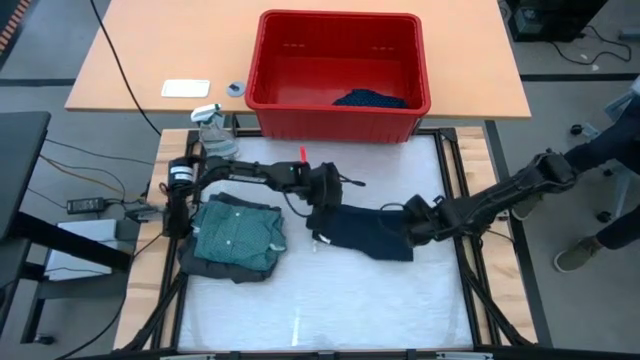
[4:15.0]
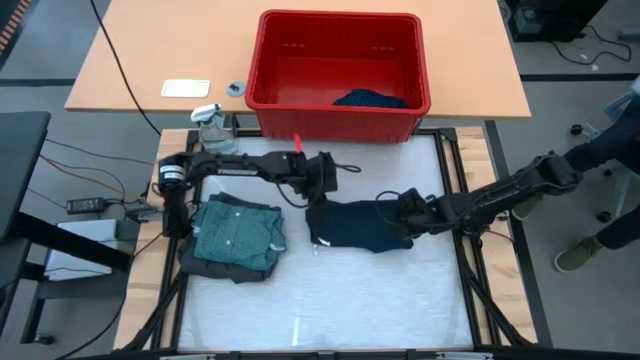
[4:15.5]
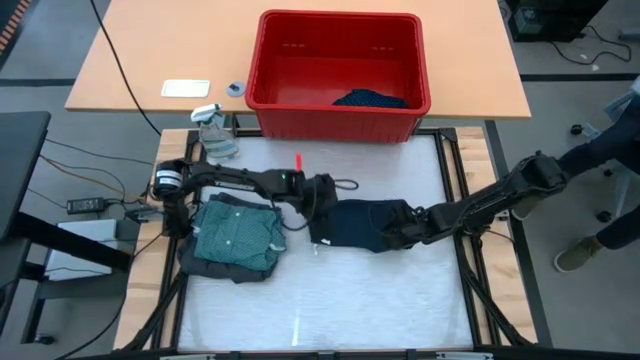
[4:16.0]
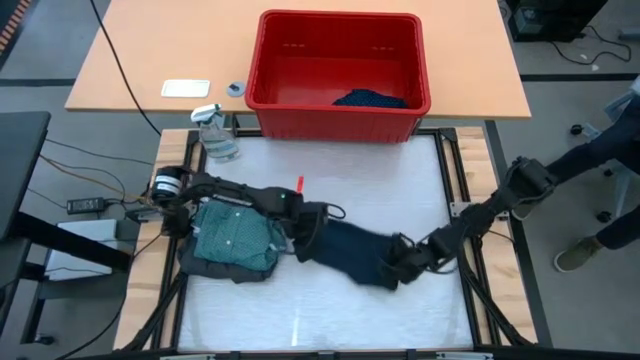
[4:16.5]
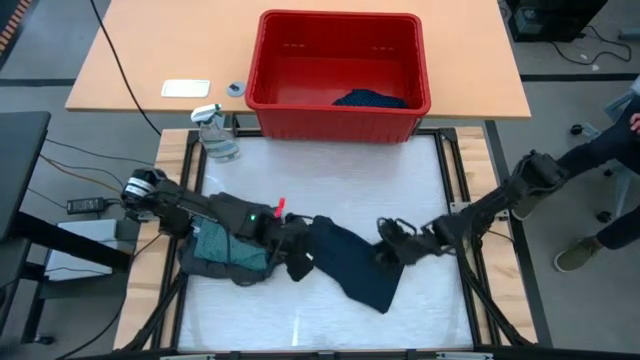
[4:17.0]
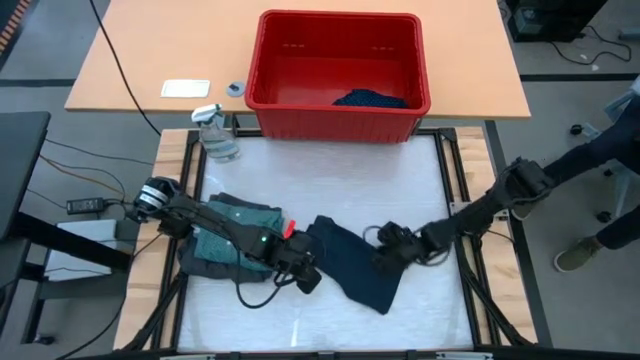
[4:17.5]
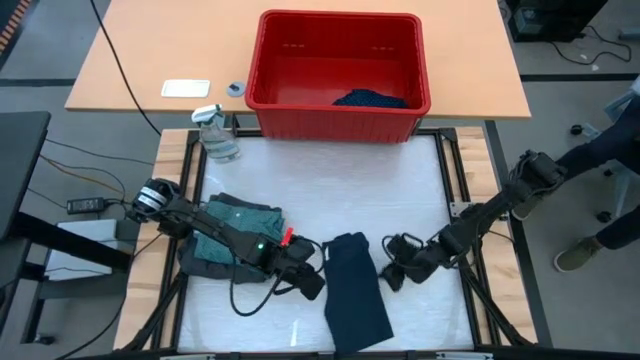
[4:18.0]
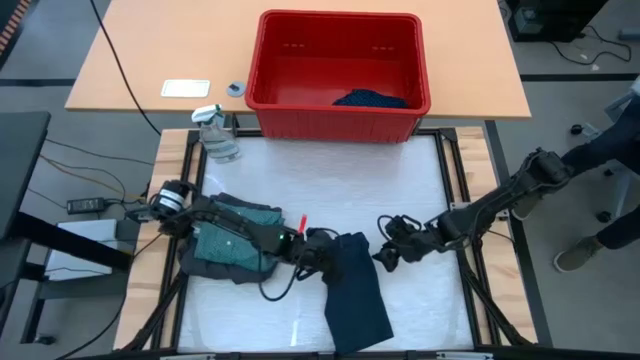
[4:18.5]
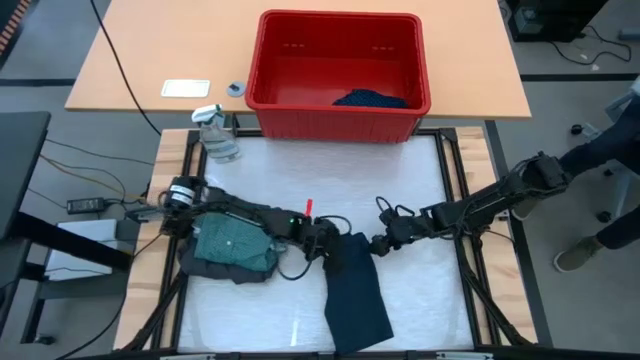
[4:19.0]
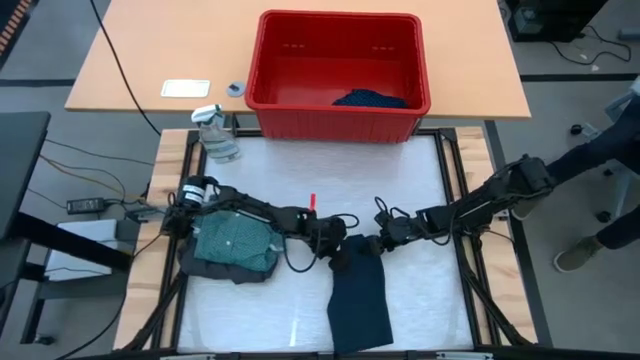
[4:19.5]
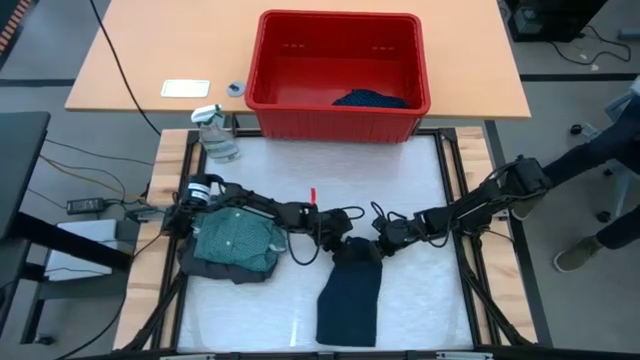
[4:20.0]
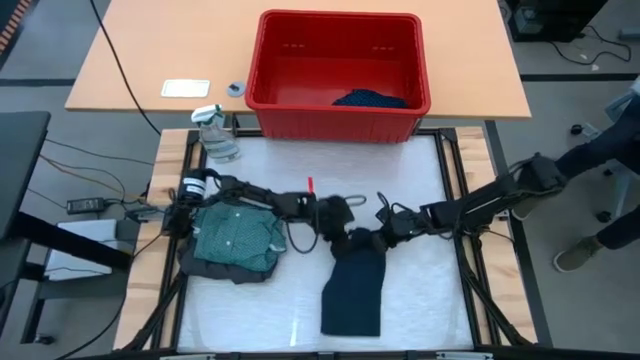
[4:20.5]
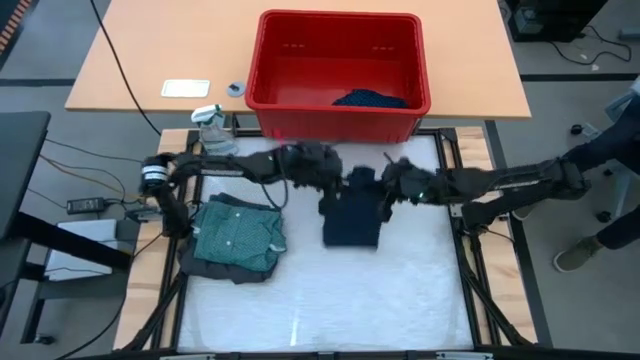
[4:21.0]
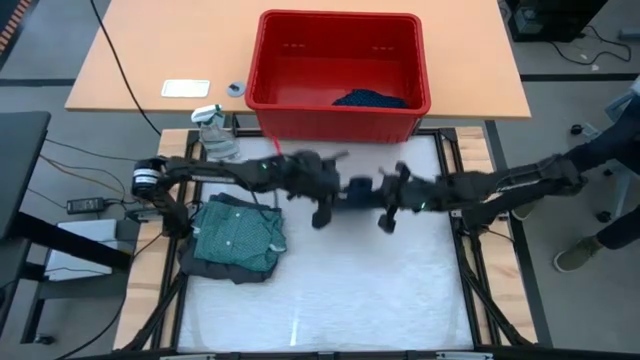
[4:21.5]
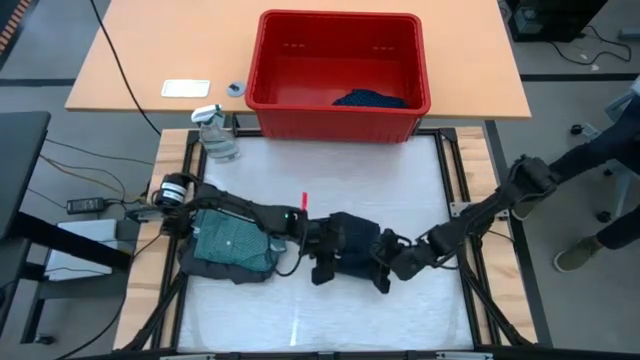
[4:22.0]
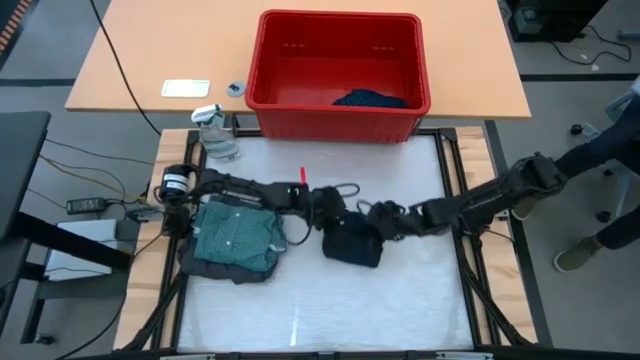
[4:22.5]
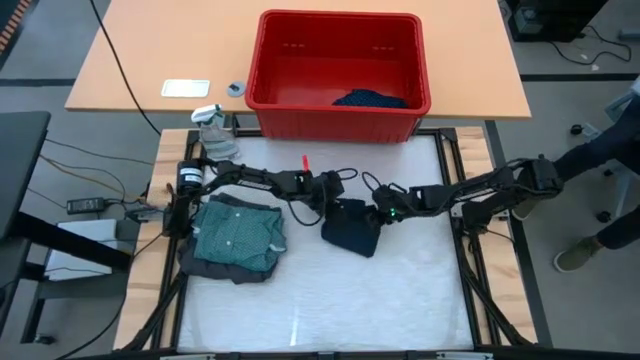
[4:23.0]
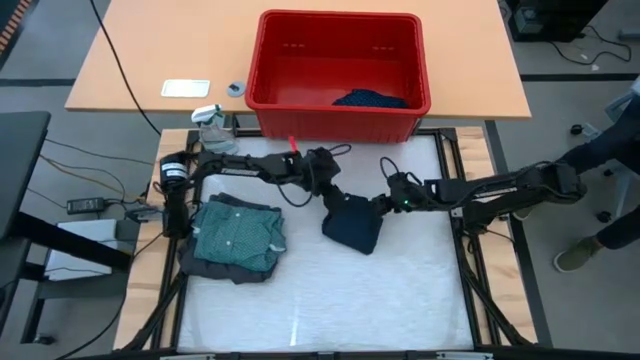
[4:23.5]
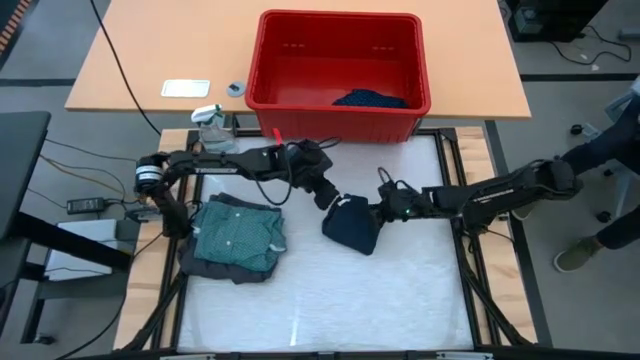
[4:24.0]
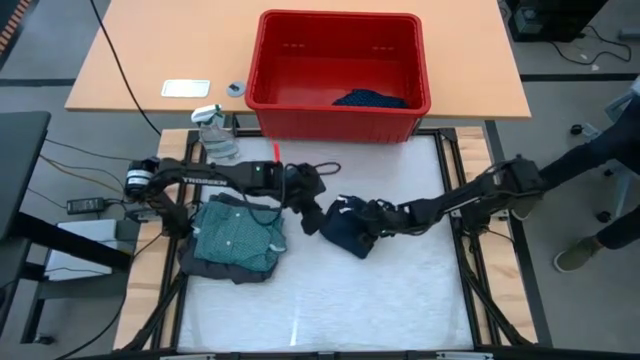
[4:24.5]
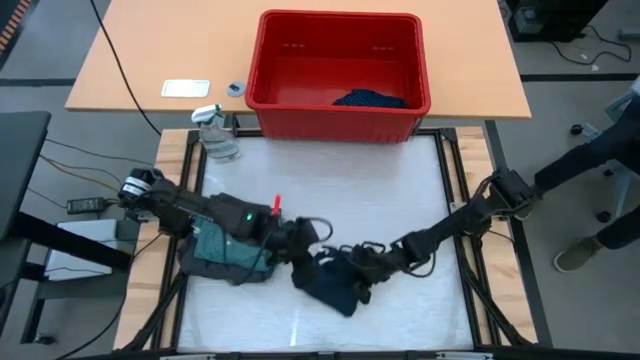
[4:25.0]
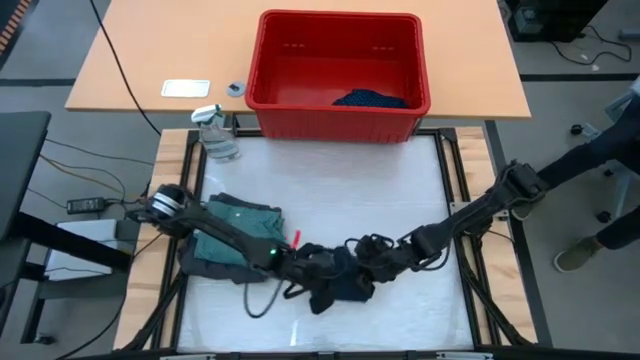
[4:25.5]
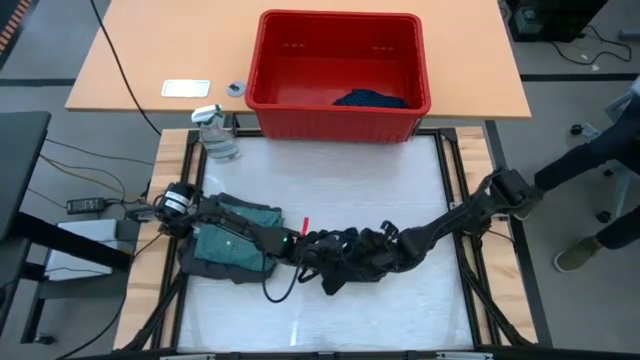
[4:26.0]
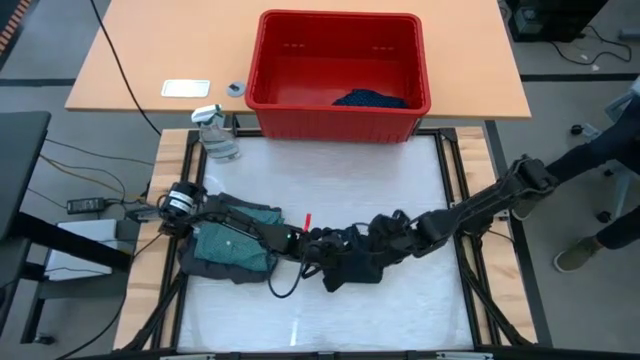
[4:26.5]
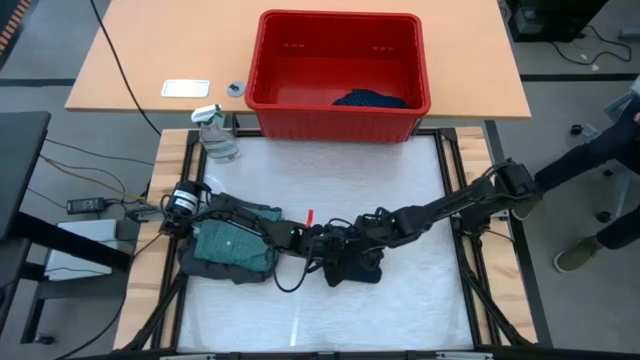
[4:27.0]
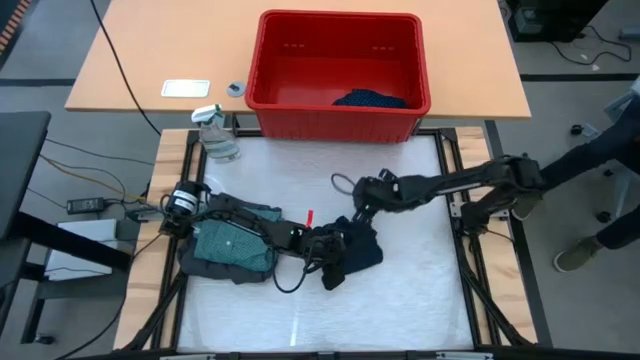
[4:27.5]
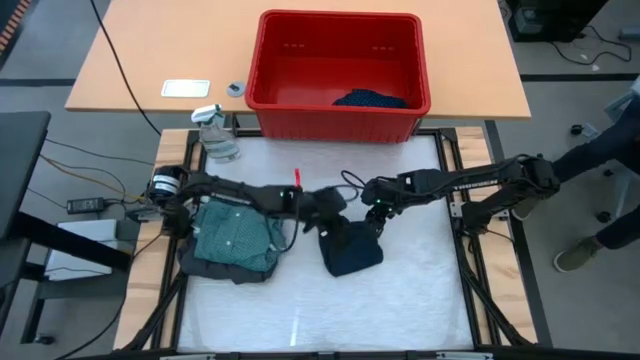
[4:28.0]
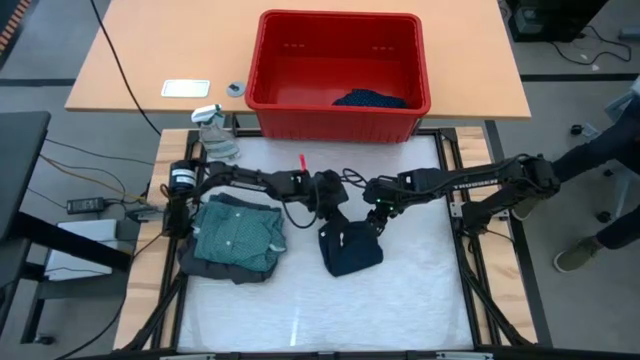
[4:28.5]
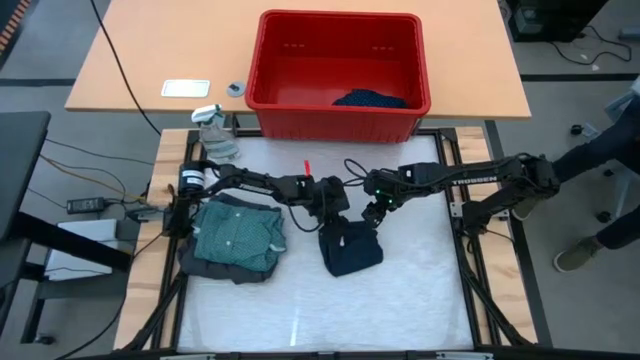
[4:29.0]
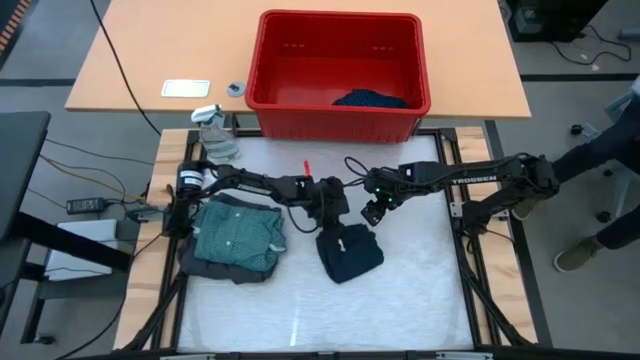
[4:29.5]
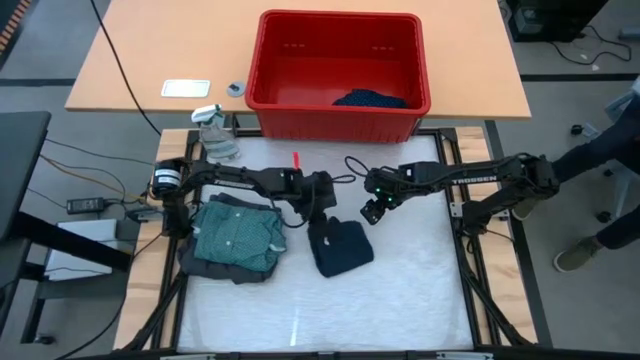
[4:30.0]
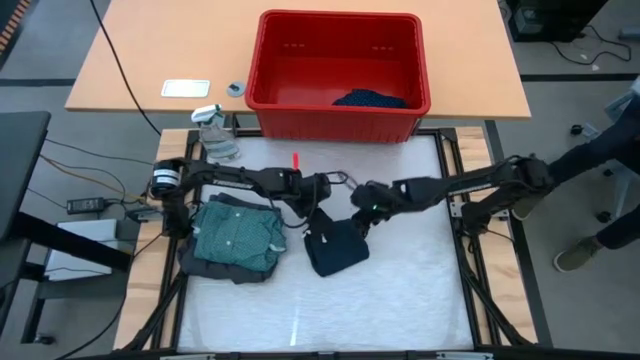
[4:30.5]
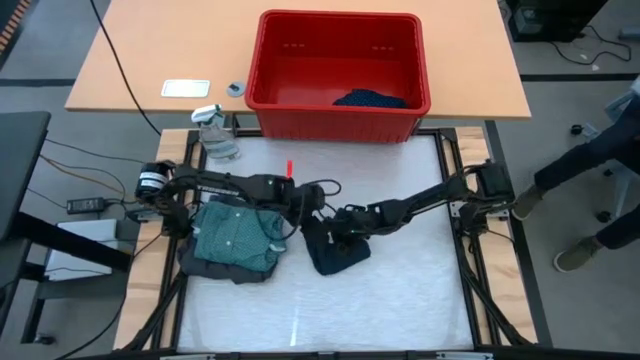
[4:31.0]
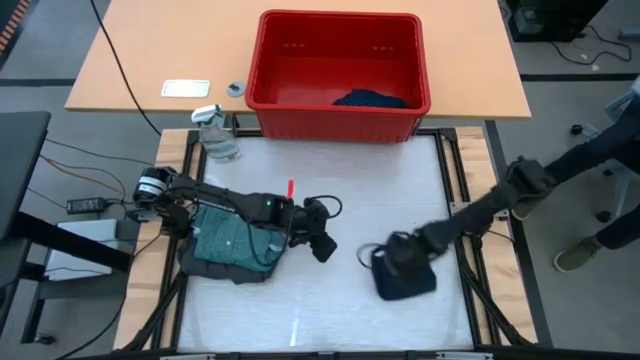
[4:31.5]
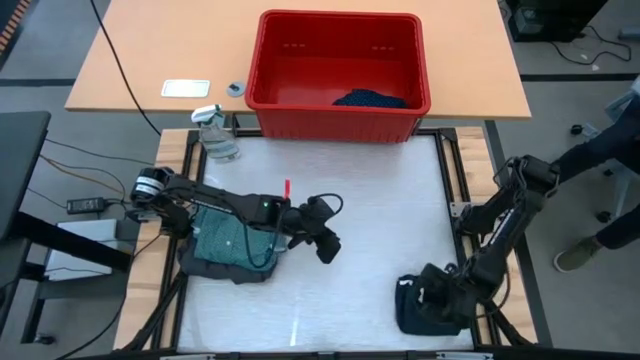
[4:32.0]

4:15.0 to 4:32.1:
Task: Fold Laundry from Bin
Fold the dark blue short on the table

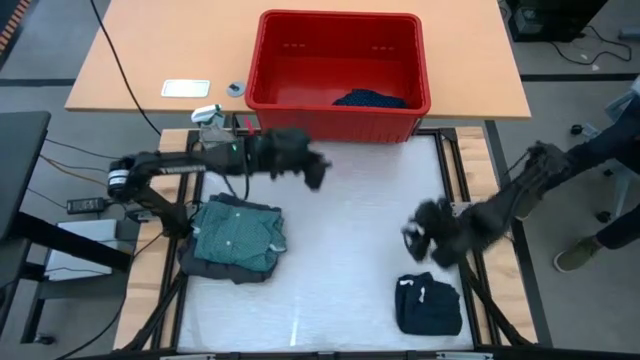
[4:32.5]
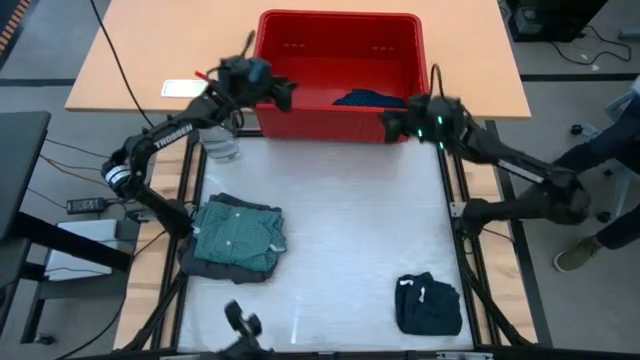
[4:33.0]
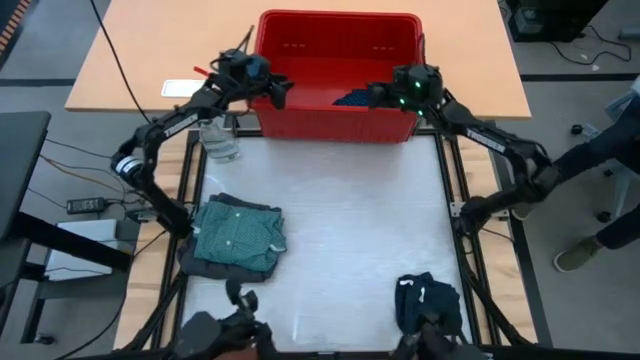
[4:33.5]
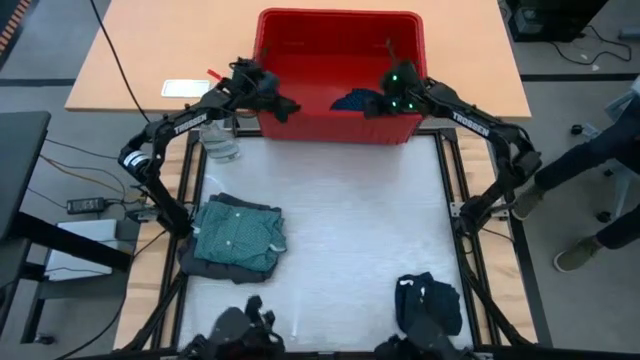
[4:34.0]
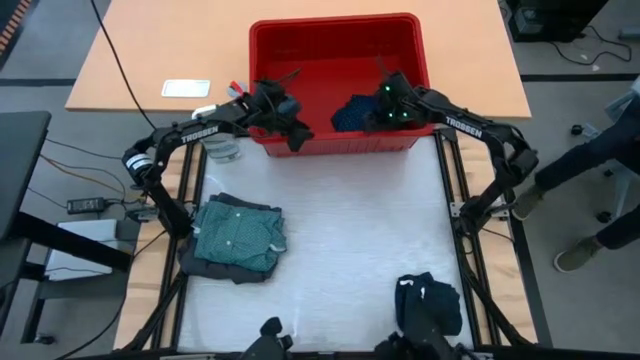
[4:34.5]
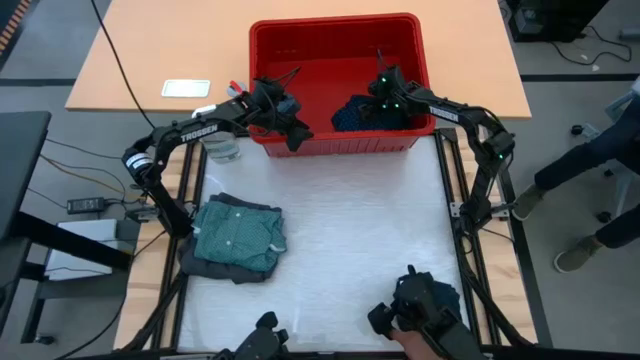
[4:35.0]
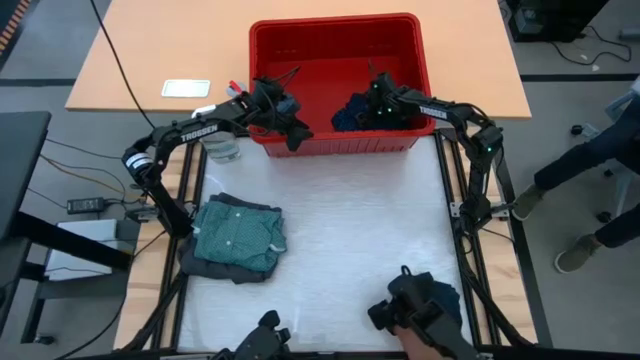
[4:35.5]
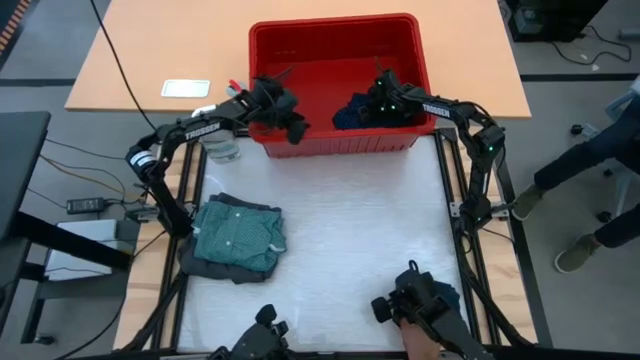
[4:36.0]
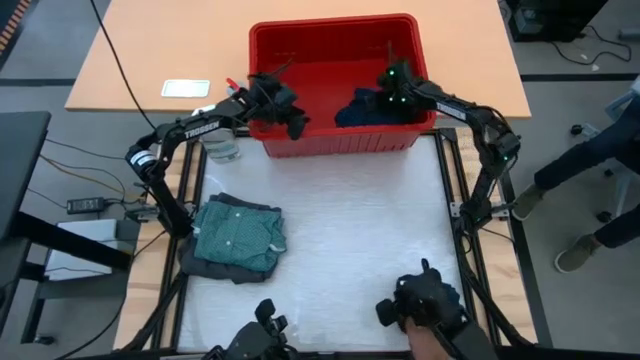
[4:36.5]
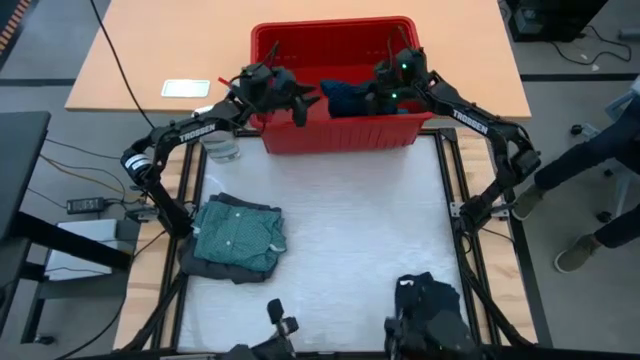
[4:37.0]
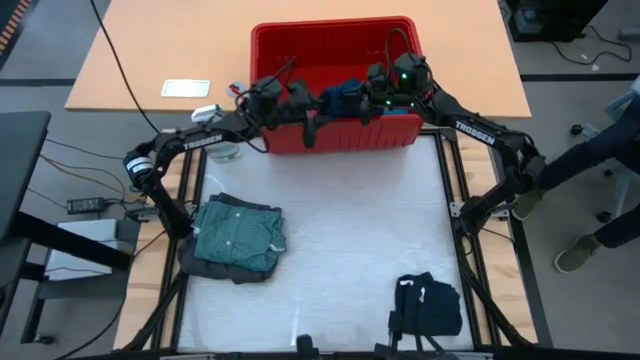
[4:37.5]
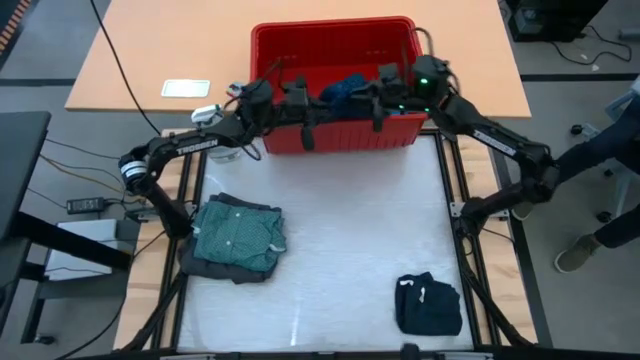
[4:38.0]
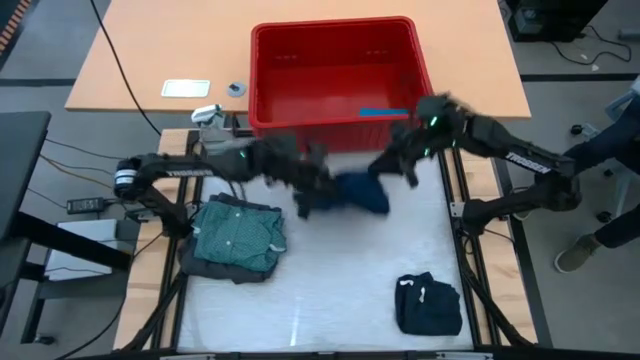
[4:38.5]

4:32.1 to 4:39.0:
Put the blue polo shirt on the table
